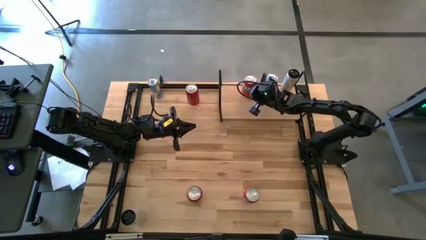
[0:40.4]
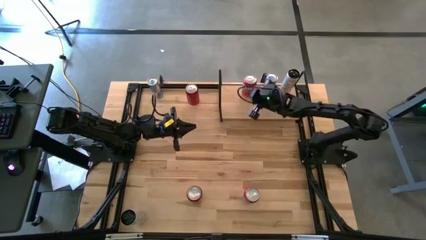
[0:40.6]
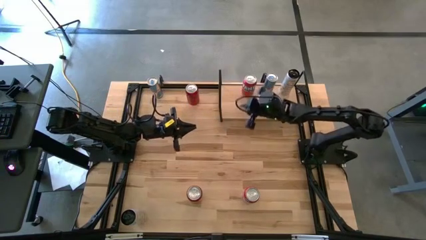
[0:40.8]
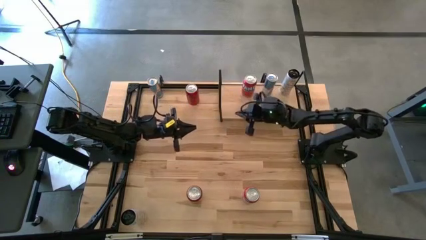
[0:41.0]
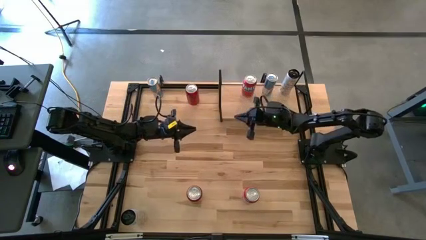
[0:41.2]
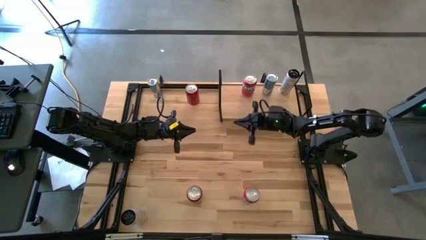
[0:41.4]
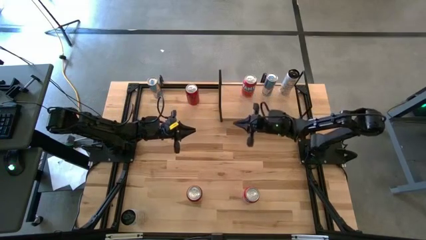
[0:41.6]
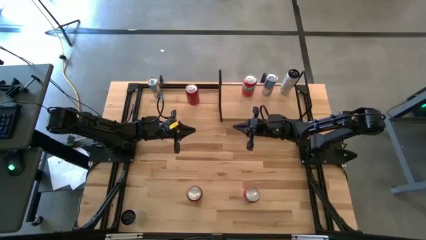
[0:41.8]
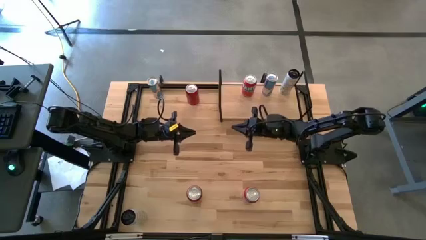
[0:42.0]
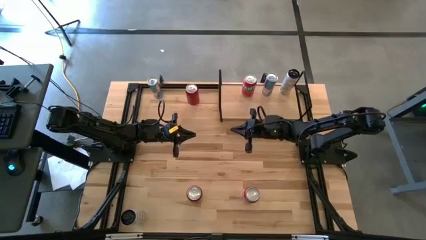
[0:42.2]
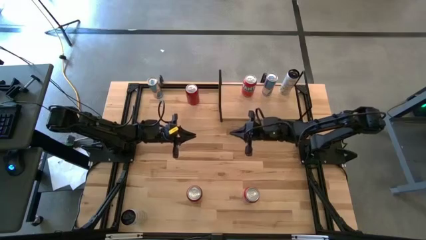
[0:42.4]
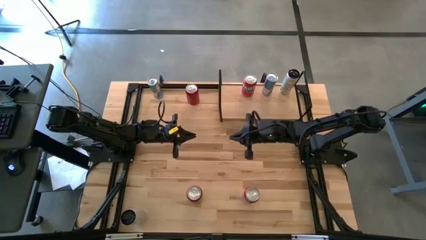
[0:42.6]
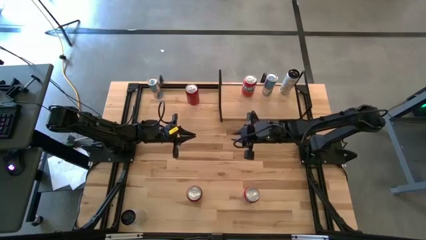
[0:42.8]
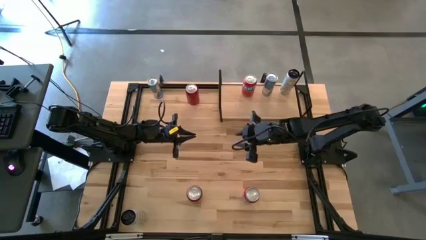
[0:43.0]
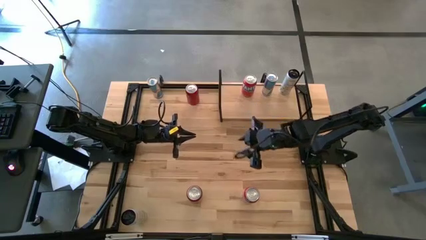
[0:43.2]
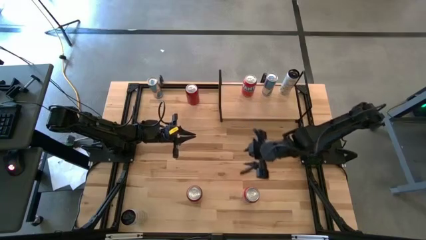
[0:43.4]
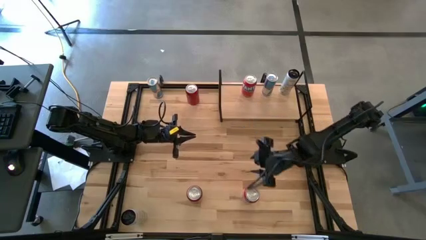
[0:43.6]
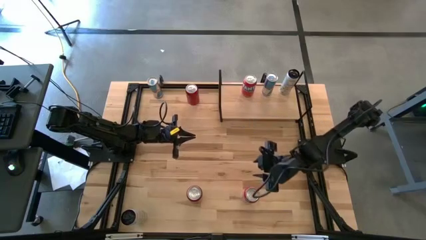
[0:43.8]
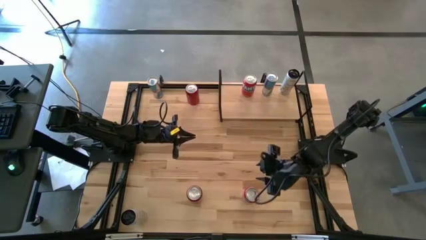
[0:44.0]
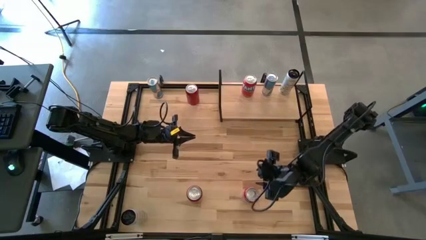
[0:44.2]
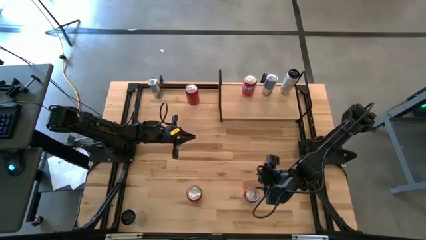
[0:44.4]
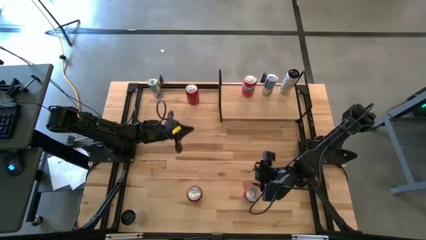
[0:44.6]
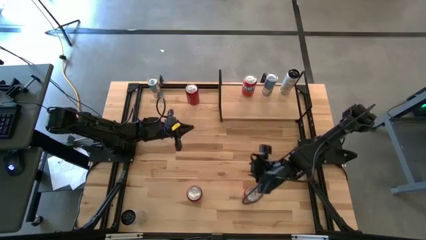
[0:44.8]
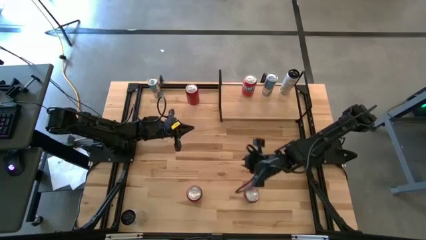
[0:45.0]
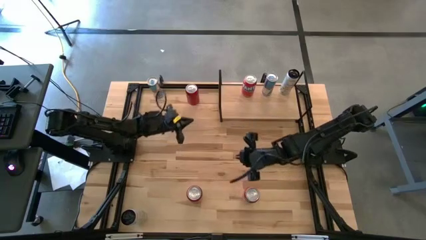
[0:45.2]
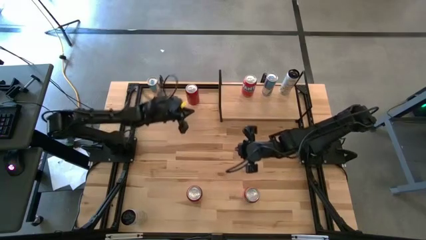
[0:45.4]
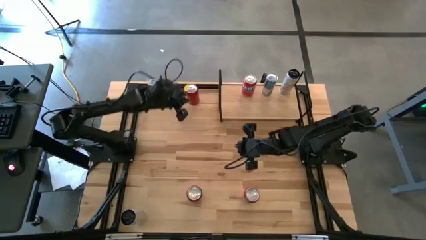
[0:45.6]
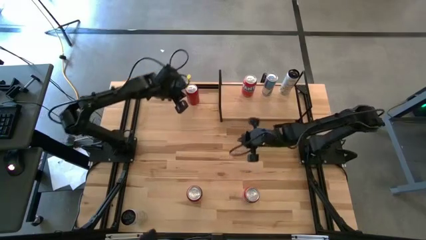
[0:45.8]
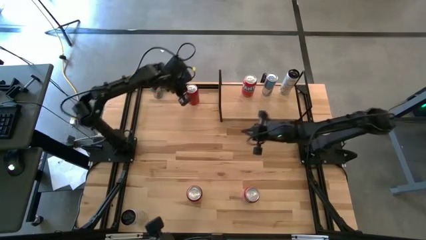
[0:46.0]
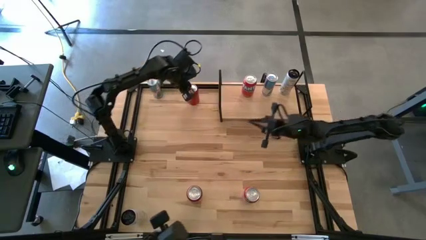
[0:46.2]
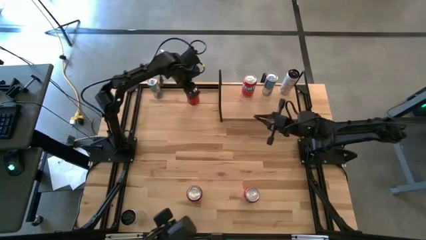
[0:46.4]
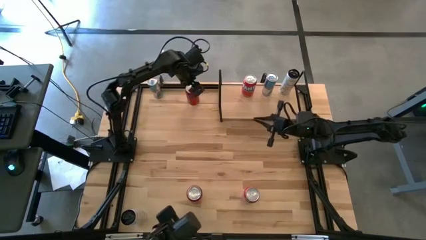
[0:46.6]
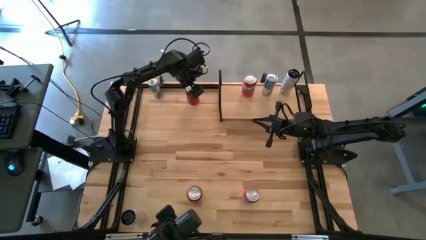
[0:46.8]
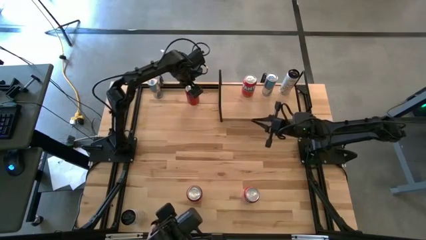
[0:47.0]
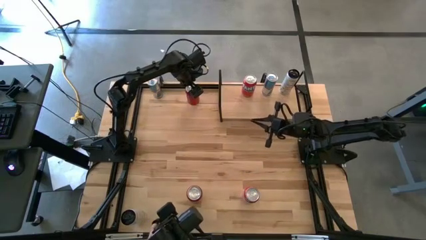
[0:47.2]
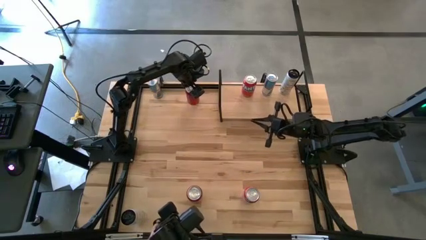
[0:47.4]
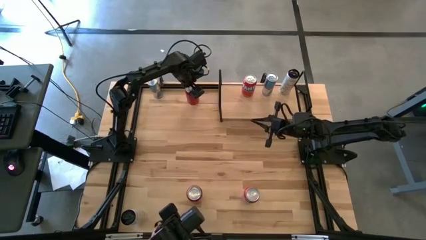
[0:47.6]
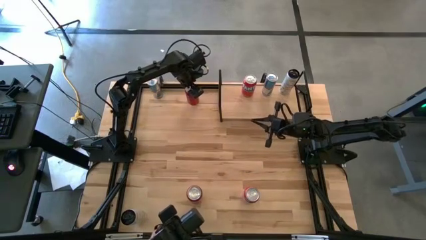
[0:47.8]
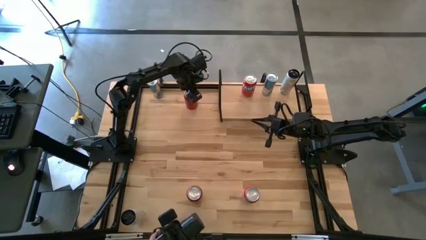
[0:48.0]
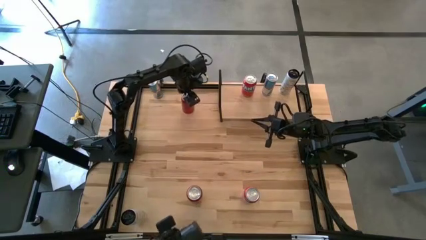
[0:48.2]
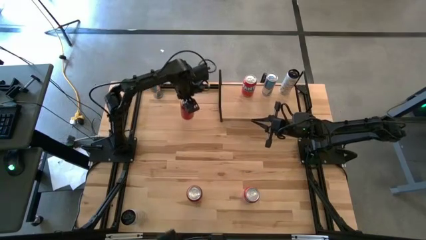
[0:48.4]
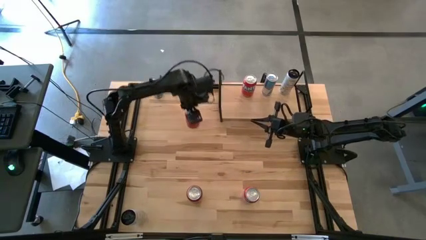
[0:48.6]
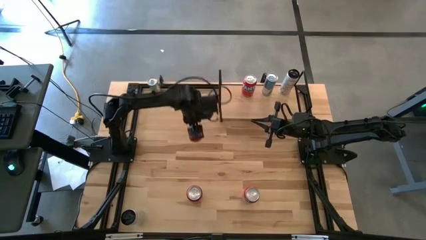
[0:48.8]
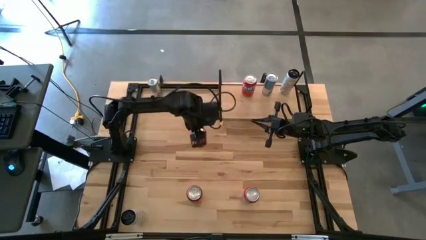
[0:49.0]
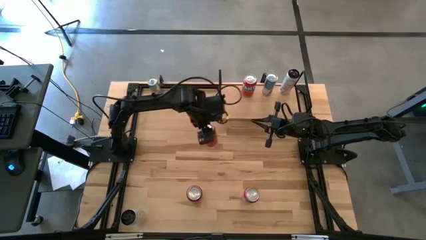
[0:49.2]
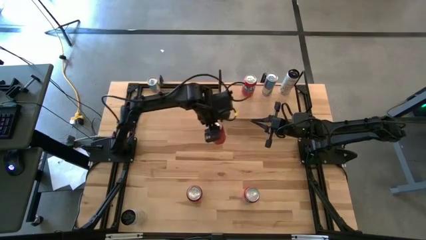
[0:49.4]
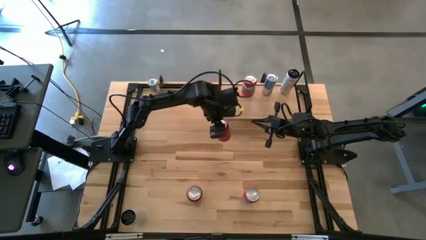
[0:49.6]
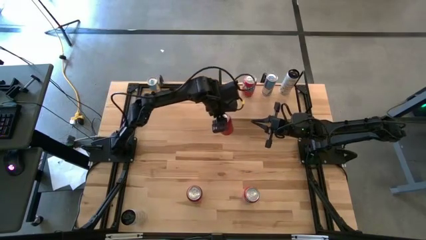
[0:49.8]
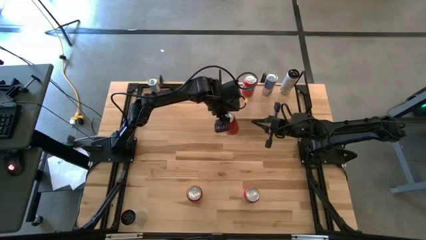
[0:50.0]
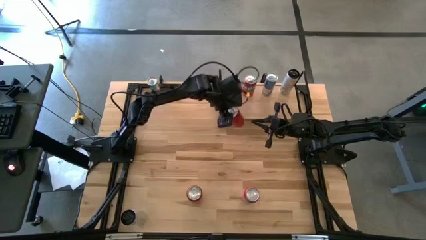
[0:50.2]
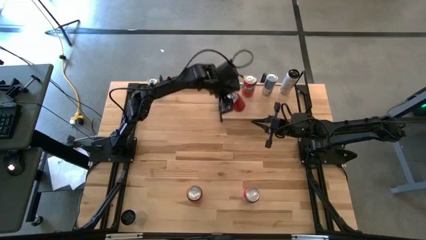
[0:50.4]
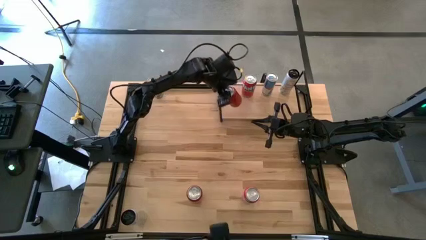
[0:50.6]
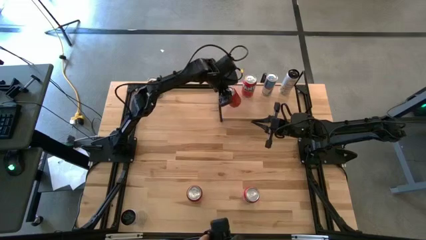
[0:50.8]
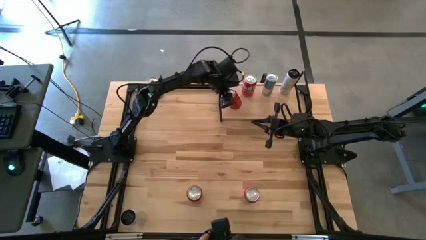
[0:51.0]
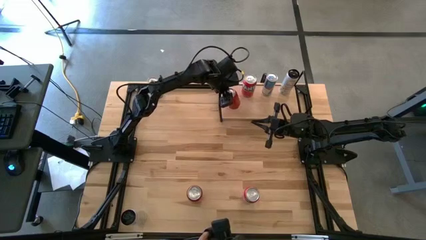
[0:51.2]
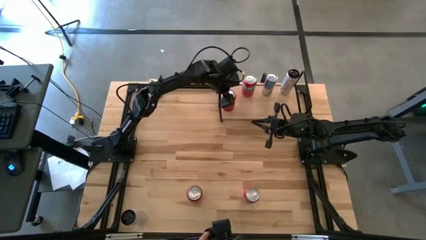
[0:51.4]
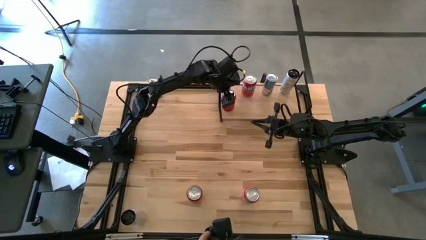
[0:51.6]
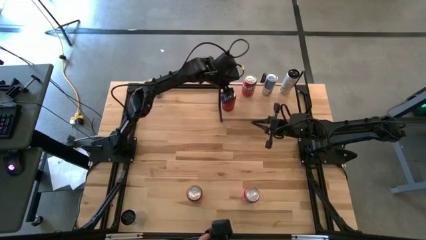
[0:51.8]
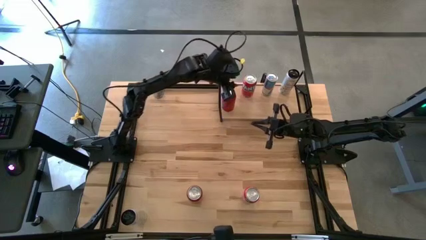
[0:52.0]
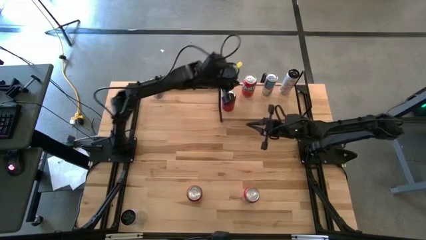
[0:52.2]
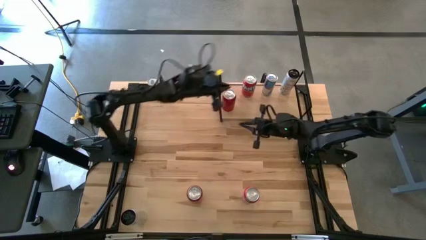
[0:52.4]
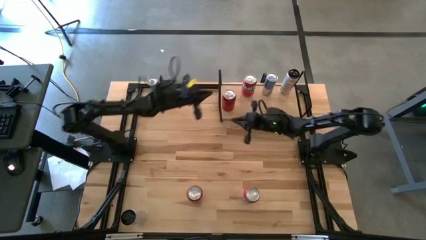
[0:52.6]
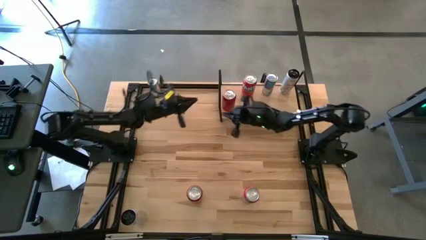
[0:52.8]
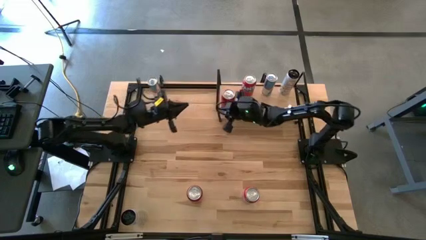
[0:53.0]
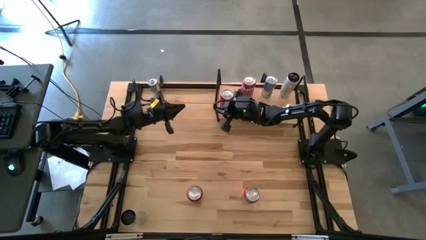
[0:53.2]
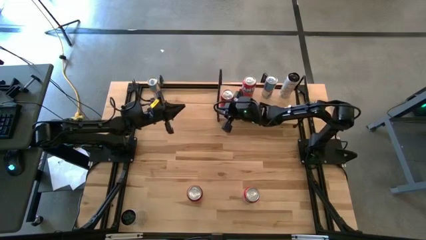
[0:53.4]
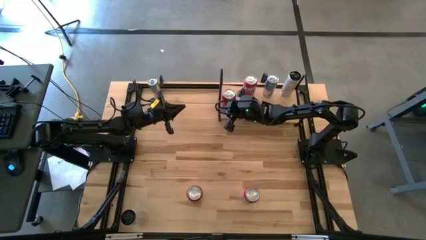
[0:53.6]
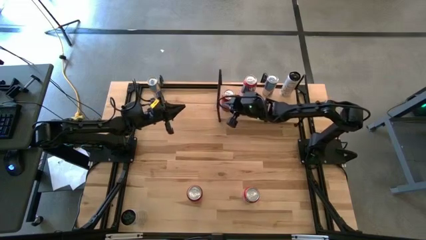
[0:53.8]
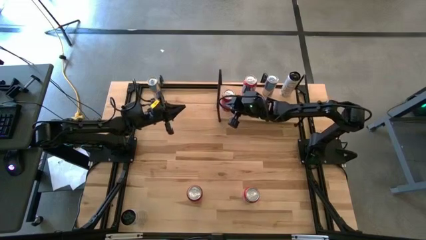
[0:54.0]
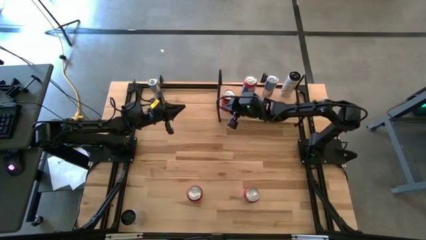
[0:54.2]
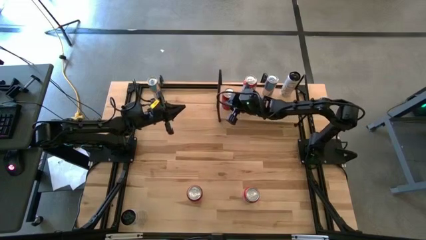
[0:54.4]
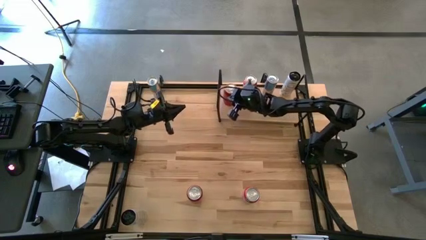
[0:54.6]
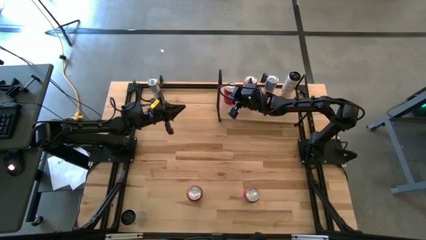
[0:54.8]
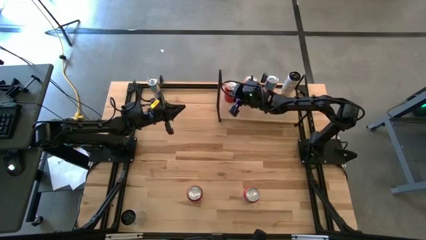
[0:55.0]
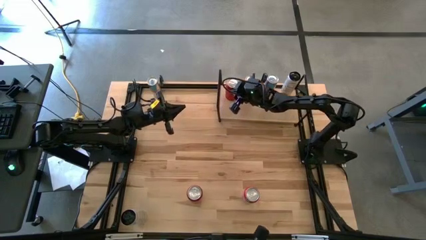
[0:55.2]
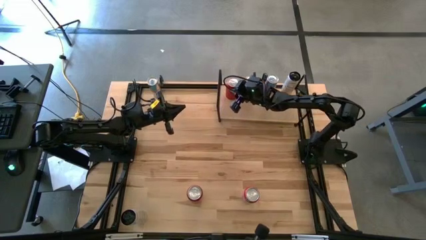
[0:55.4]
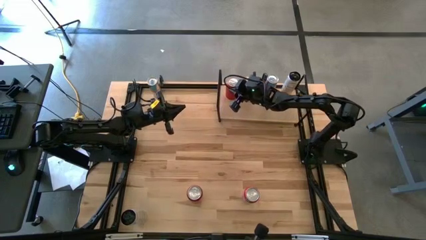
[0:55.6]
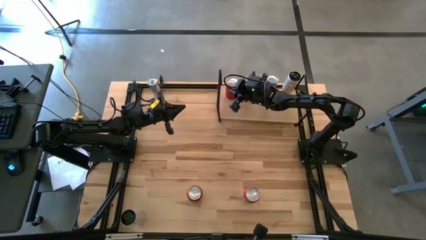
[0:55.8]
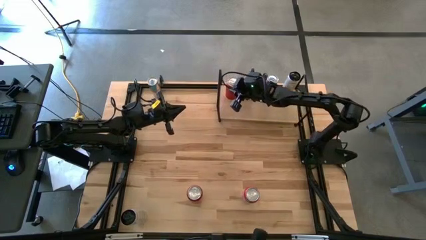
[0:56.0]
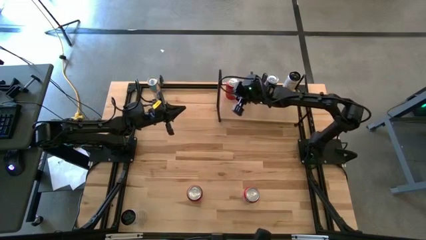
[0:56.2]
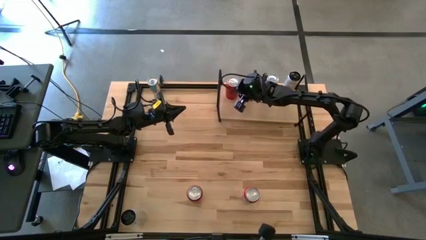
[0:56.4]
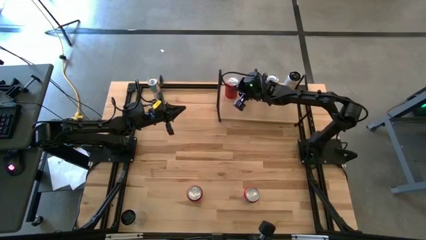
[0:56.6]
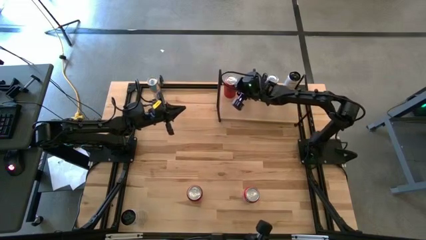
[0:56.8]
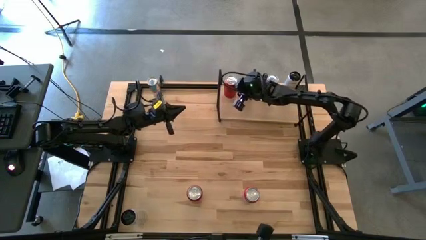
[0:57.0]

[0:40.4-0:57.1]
Task: Place canned beverage on shelf
Put the top red-black soda can on the shelf
